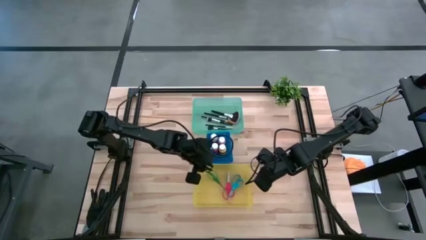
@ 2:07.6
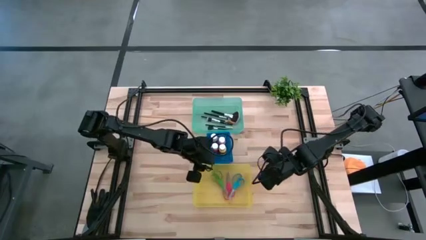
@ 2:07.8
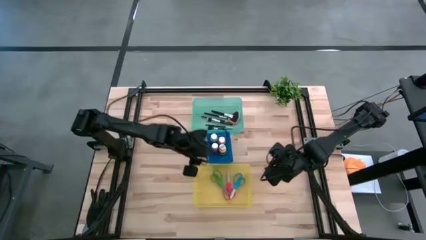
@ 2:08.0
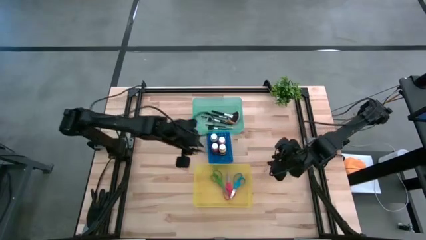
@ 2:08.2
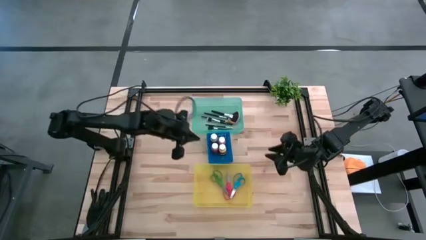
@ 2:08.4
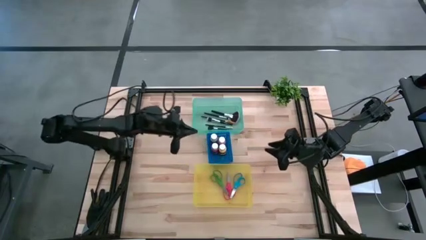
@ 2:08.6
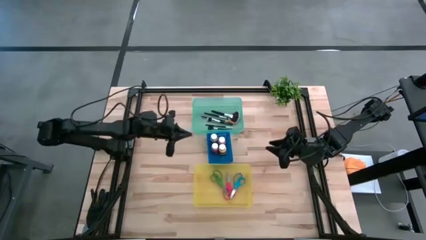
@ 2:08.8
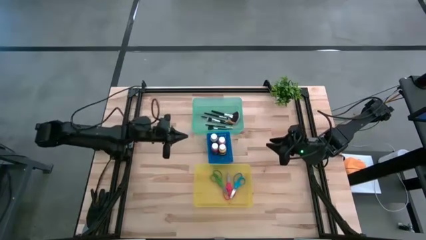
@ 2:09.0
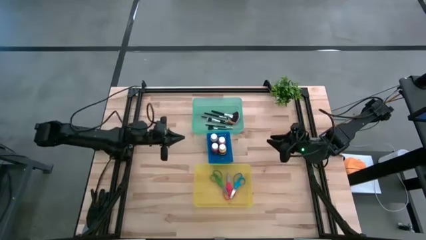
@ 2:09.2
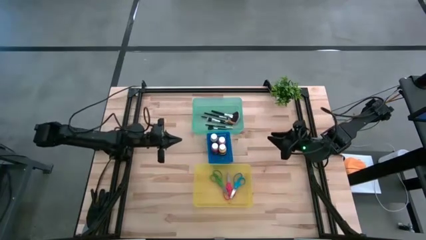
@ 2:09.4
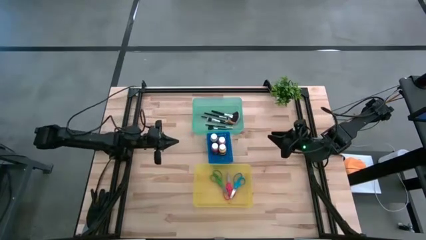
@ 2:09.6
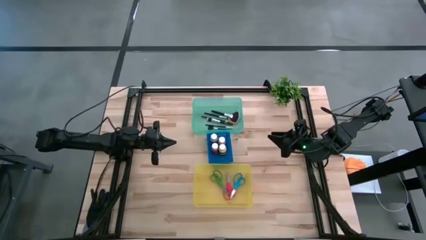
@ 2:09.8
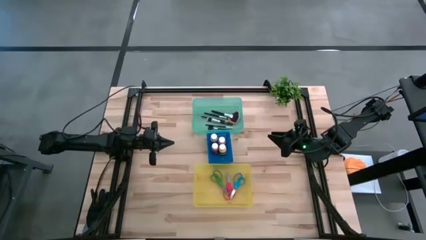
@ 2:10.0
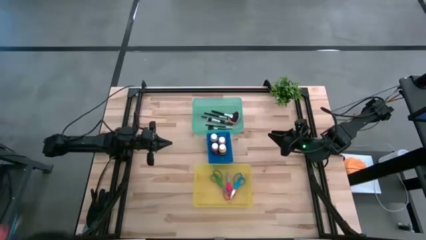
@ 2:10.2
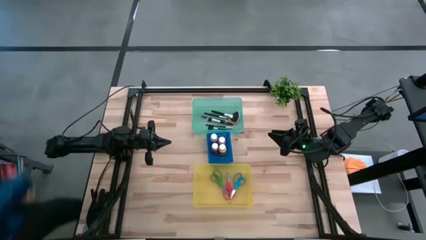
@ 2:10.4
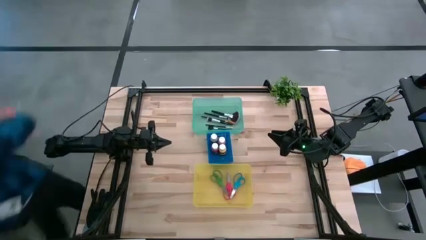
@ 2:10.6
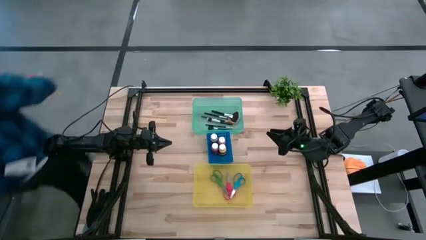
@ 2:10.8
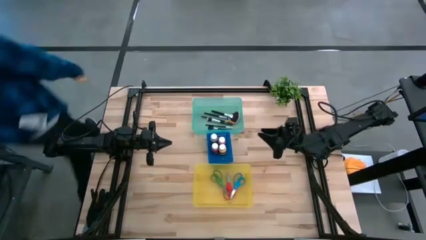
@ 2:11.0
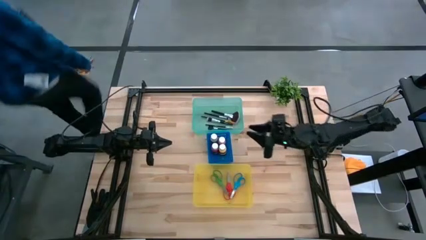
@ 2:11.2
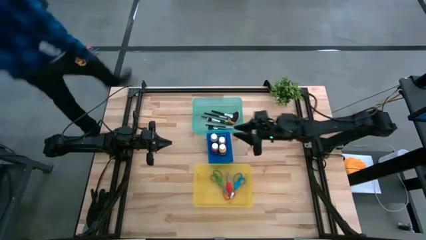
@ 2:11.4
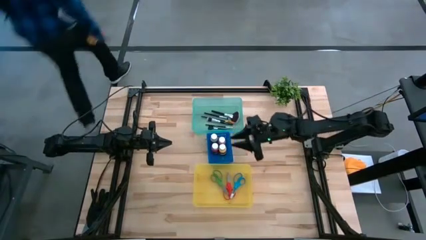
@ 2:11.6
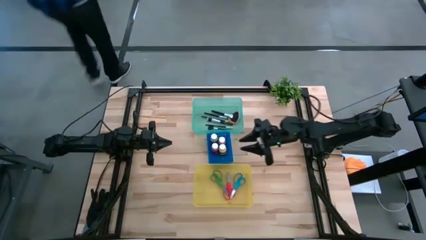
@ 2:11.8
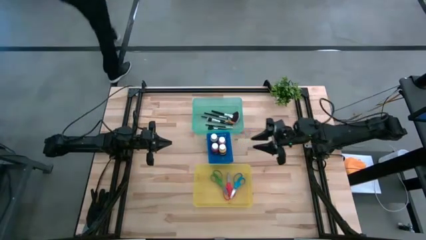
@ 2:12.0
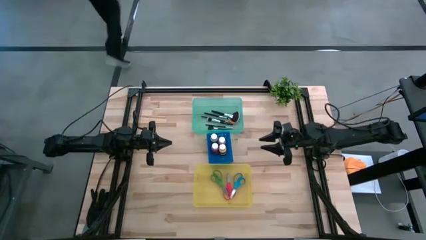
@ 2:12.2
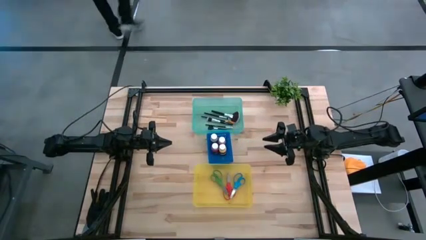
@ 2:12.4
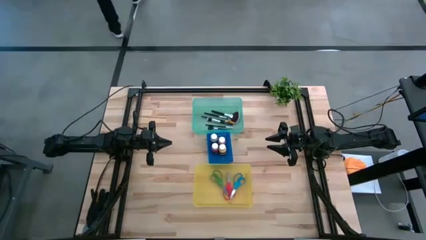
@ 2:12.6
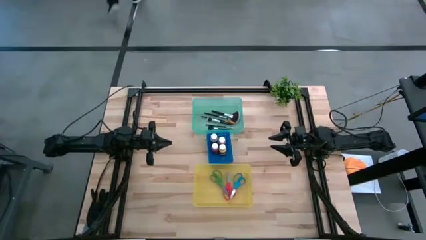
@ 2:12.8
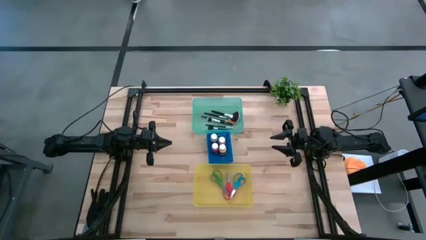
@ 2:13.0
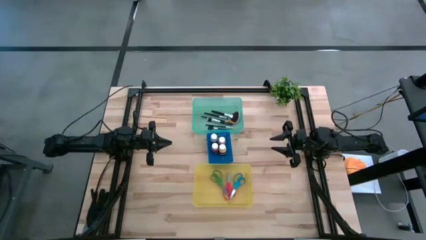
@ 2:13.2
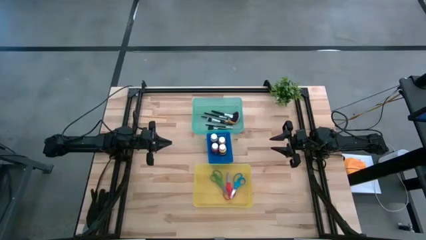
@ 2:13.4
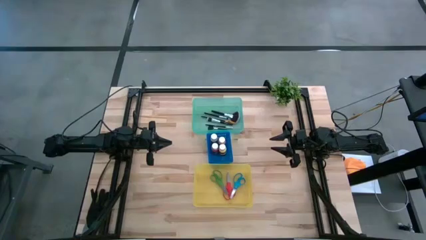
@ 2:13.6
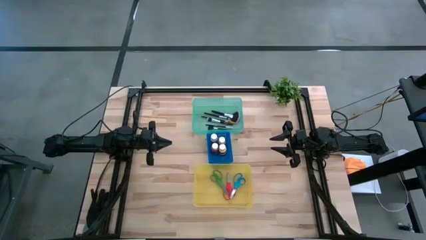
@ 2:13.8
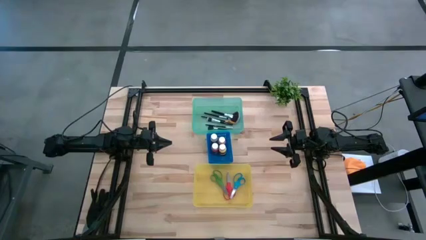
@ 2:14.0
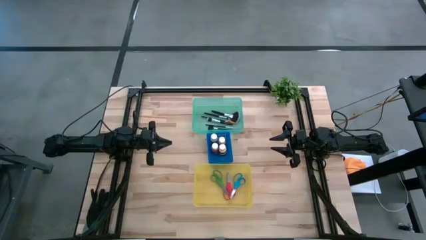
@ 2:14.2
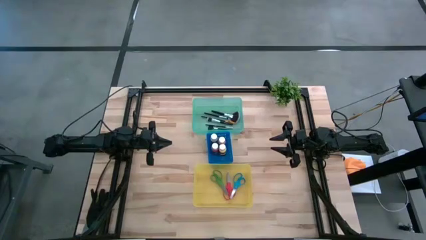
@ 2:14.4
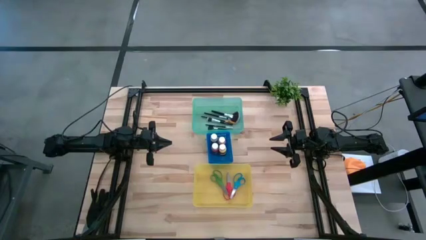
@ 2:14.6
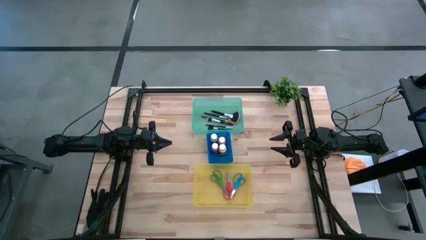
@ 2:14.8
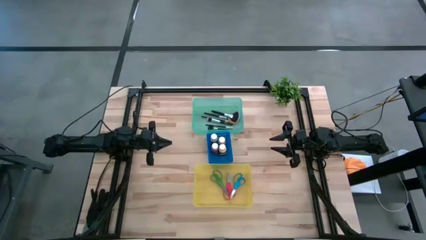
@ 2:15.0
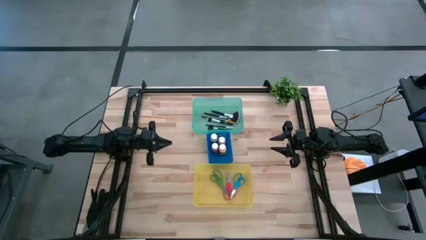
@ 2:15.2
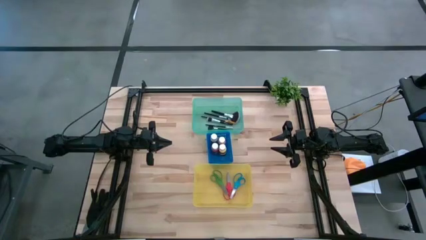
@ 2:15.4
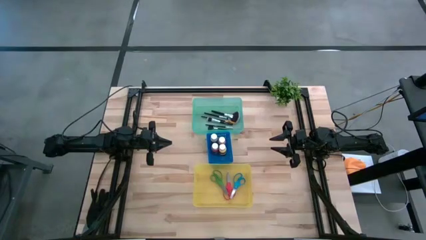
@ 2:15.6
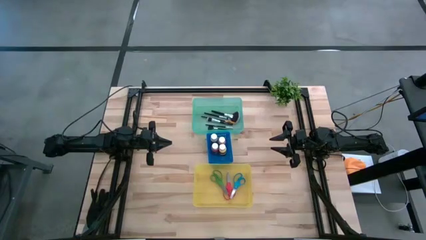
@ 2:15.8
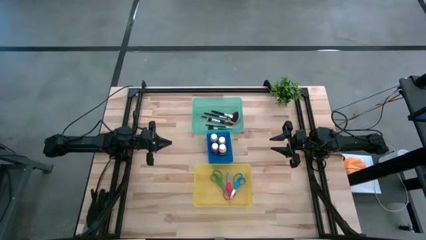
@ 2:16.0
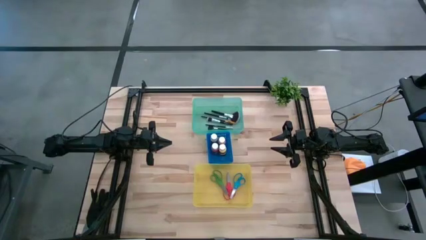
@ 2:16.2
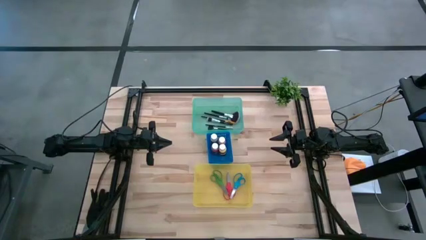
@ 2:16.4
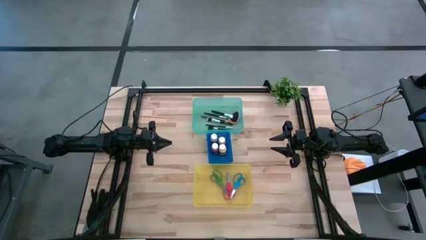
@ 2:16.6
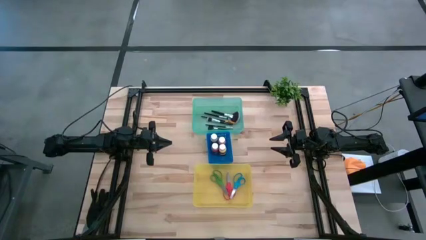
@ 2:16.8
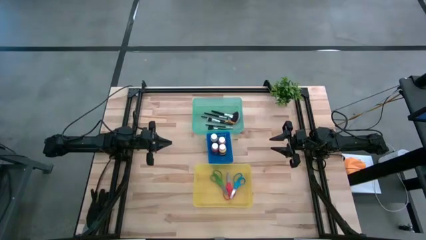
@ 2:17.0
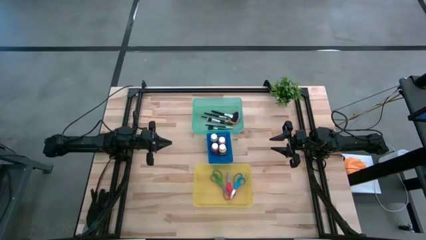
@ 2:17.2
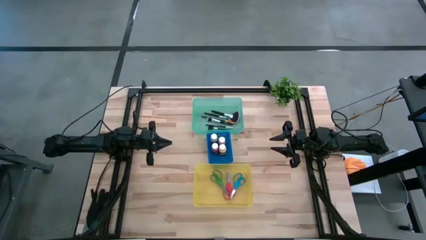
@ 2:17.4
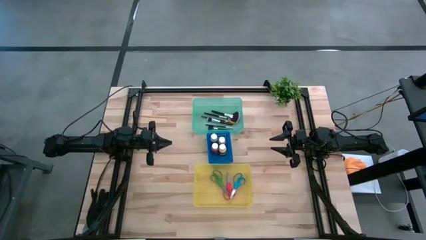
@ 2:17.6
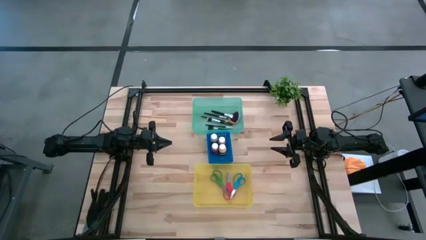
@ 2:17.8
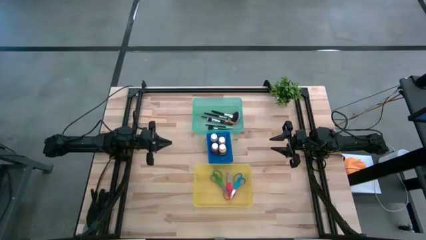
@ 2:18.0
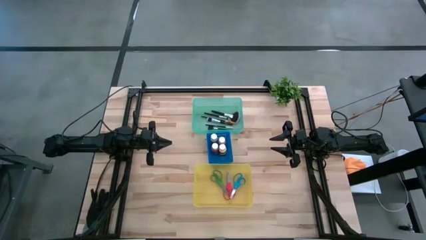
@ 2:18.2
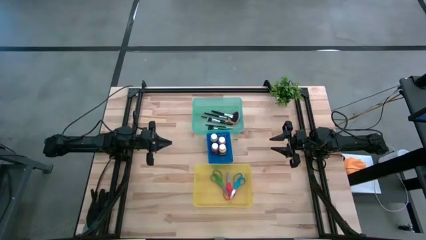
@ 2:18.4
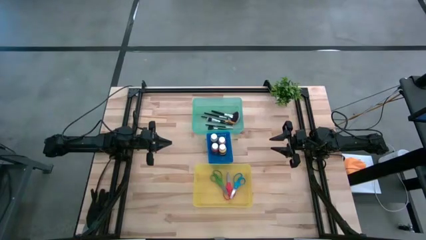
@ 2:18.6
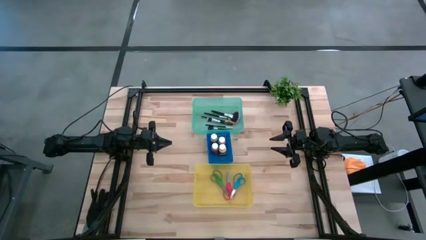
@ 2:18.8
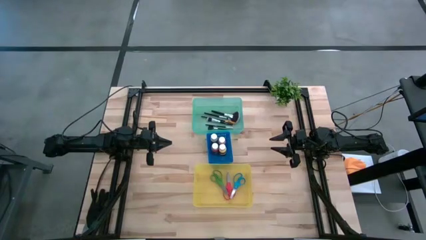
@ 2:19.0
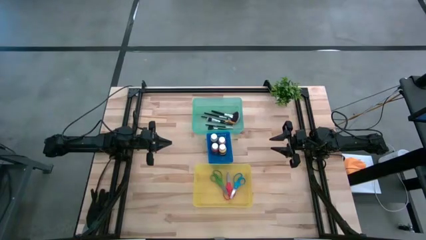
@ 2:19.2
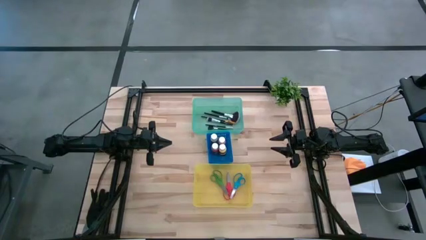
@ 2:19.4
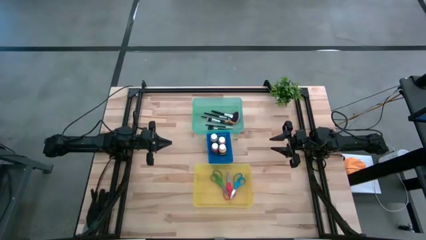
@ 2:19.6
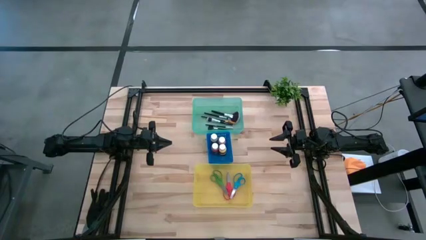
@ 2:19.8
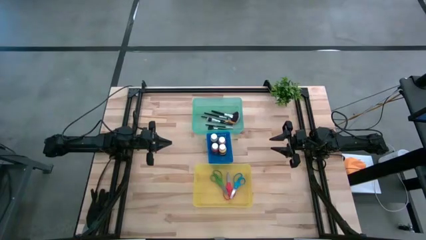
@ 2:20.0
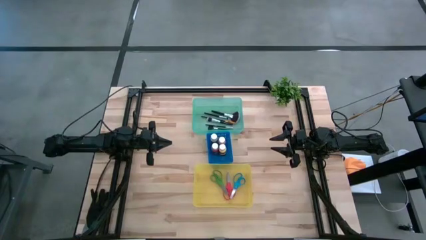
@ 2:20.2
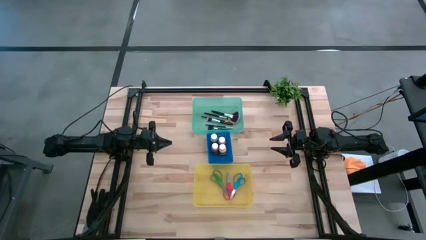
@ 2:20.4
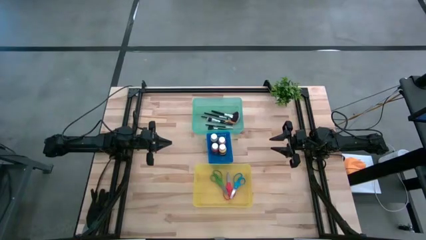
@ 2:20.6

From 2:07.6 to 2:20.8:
Task: Pick & Place Paint Supplies
Return to Home Position
